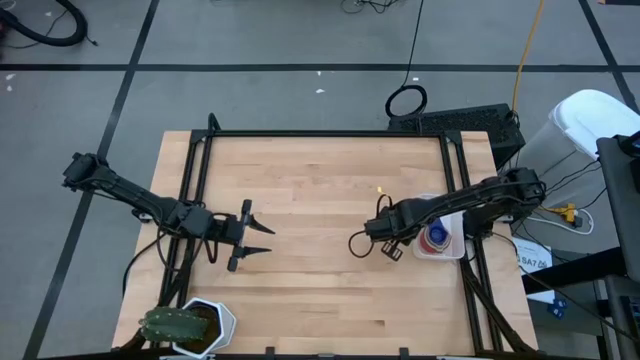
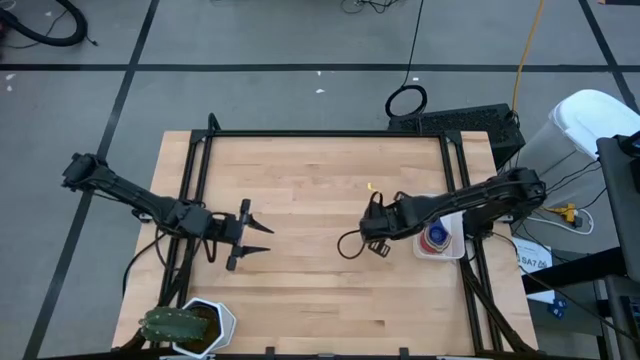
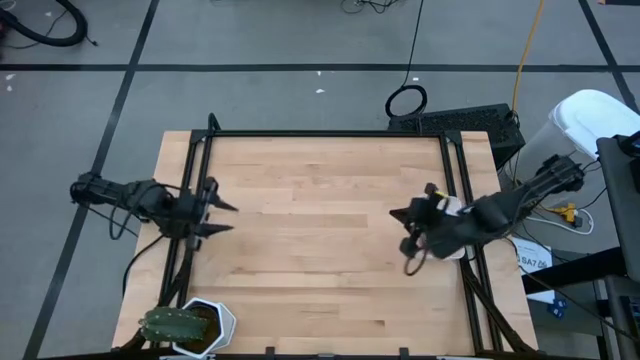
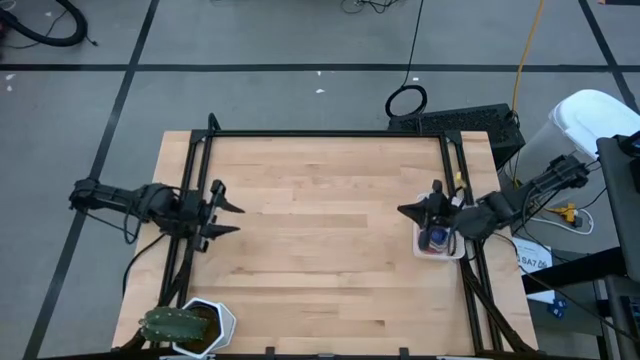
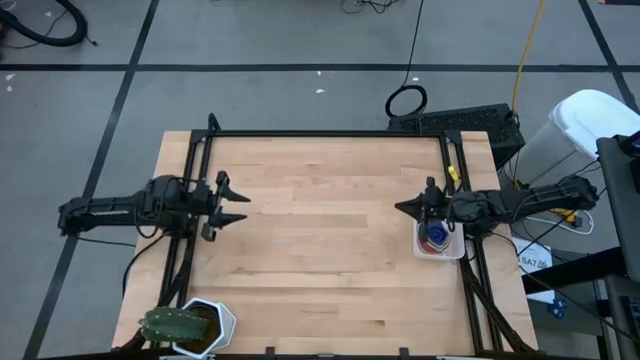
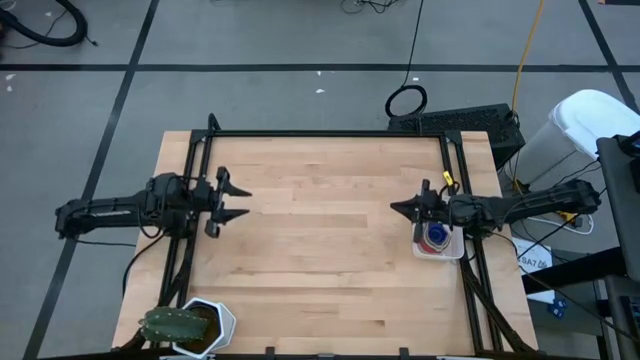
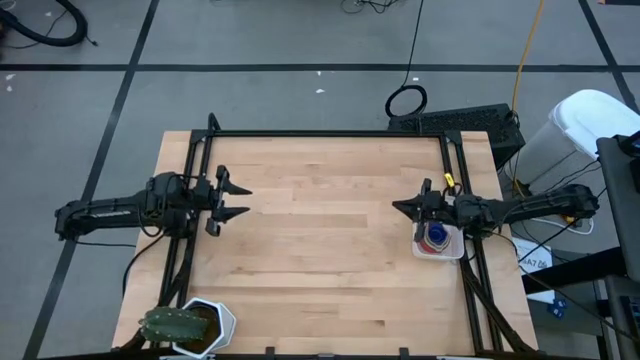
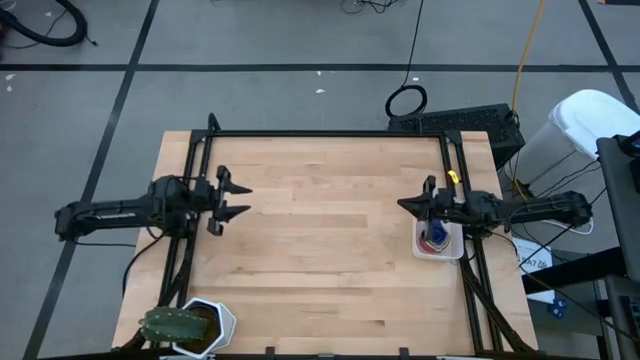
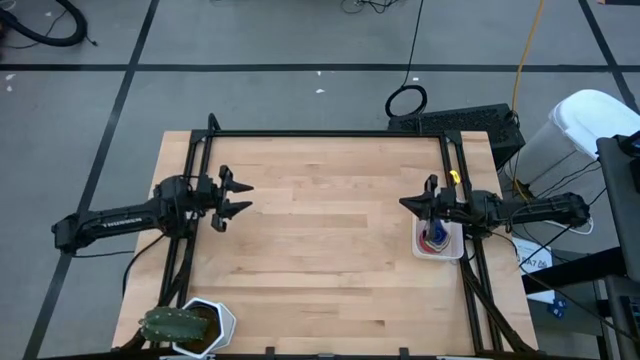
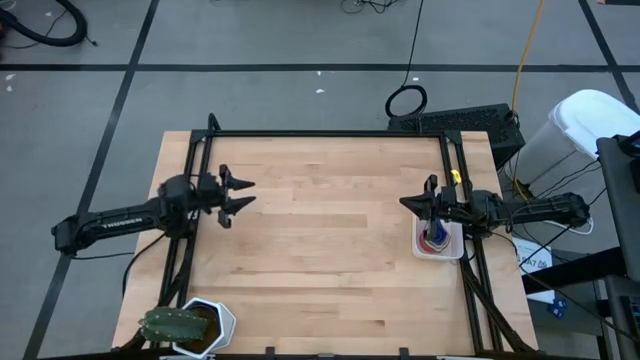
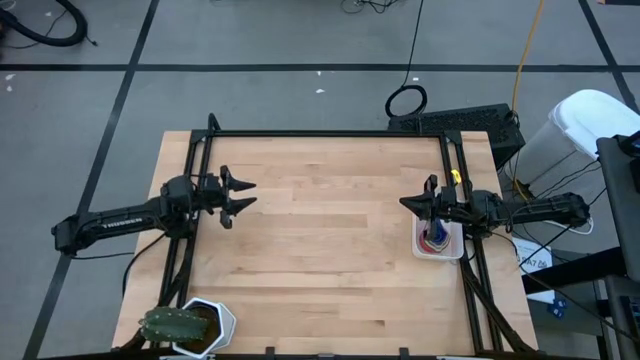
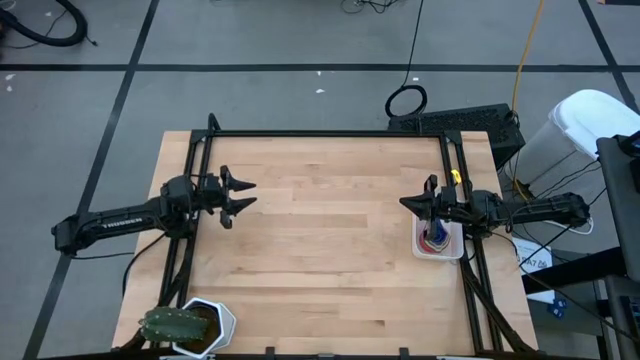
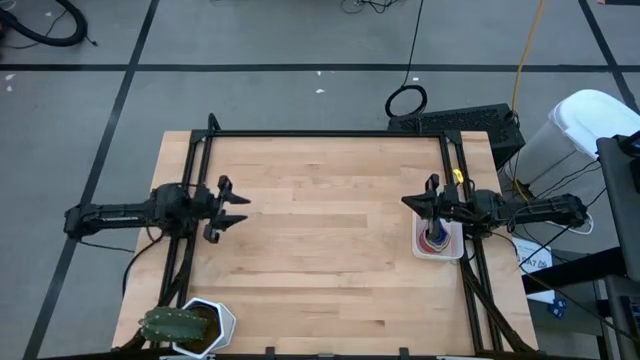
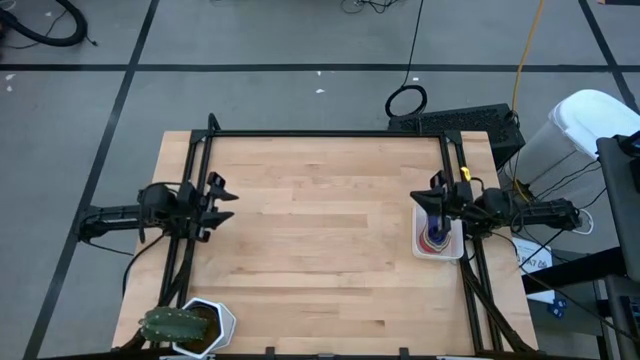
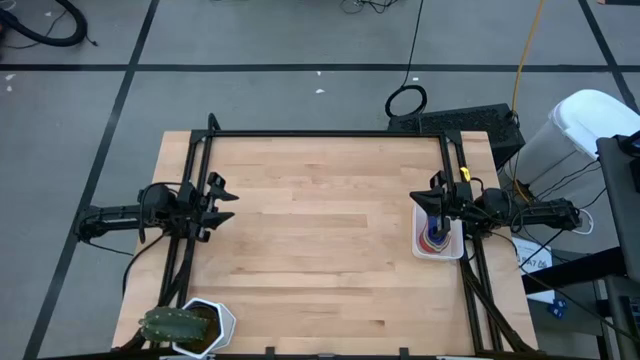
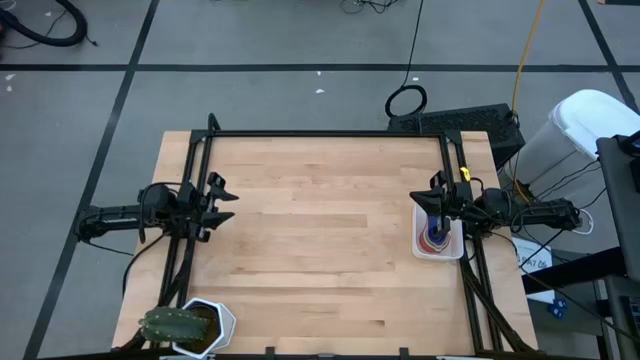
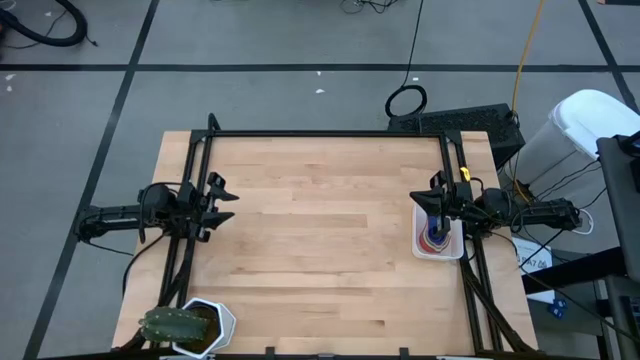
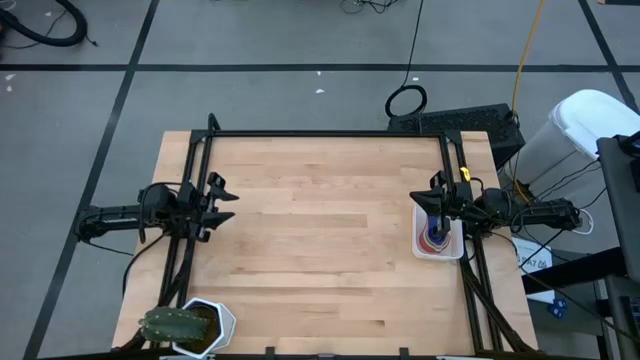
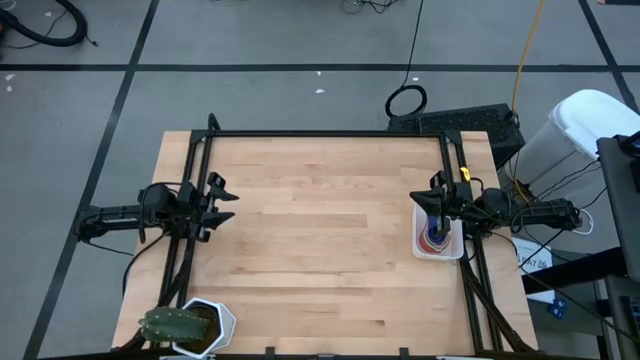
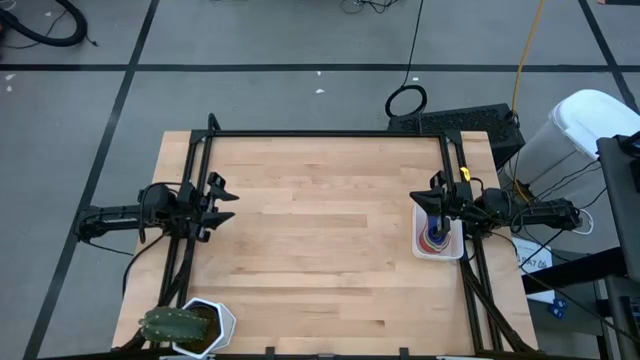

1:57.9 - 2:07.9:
Task: Nest measuring cups in basket
Return to Home Position

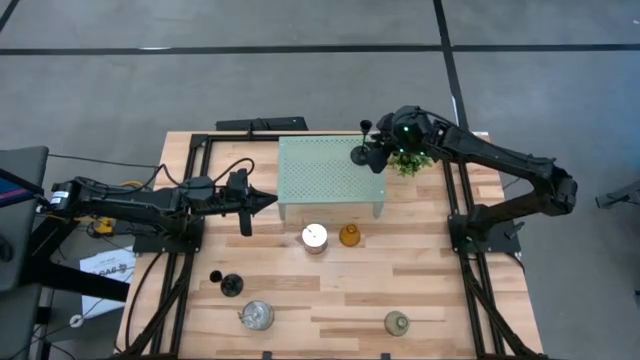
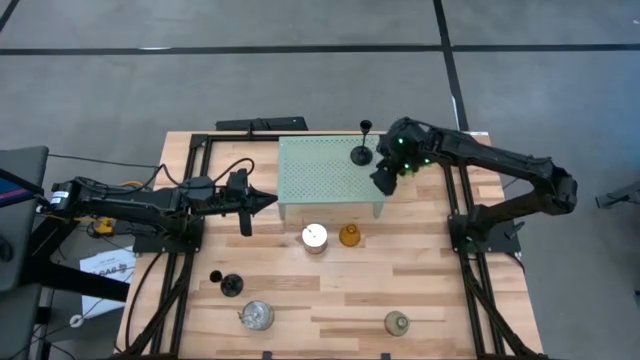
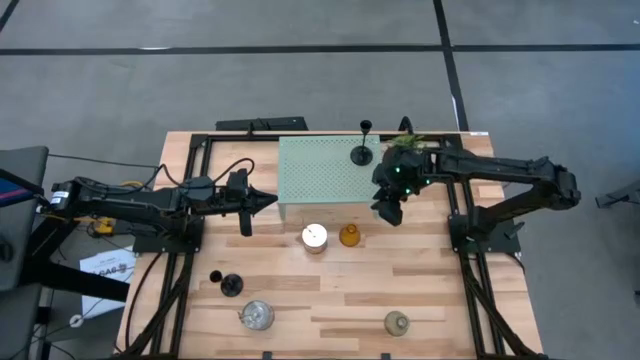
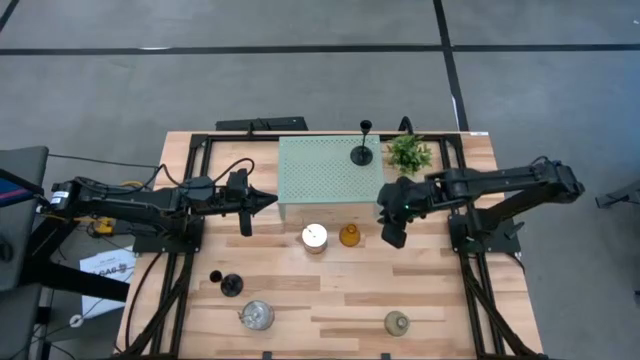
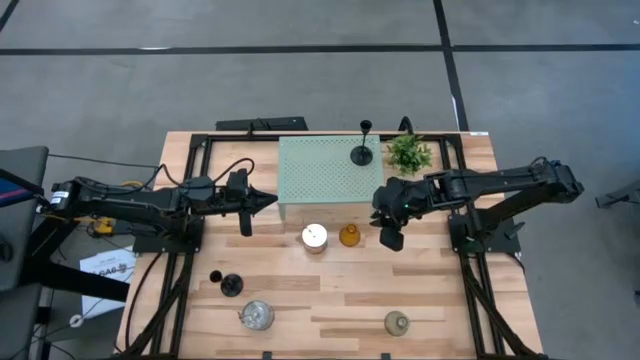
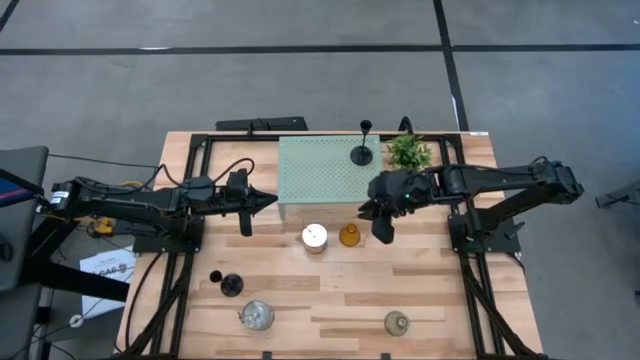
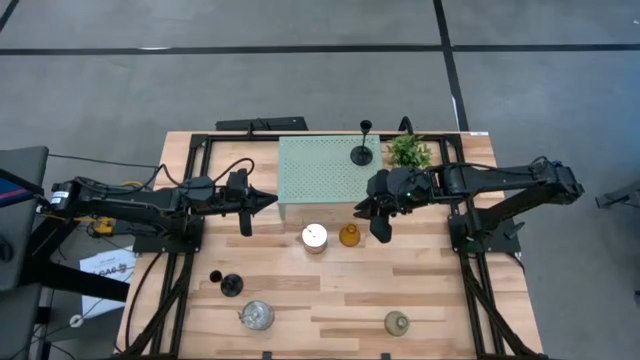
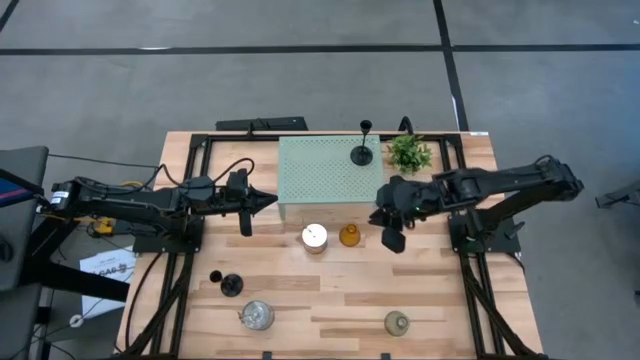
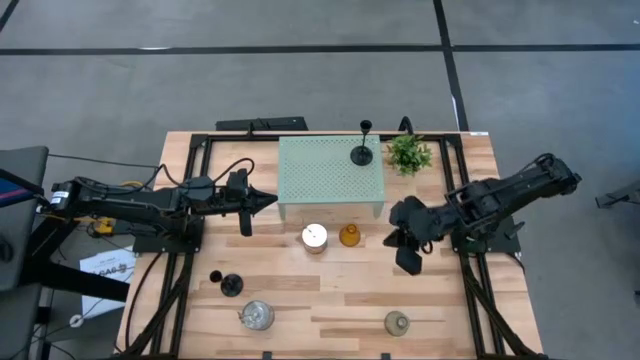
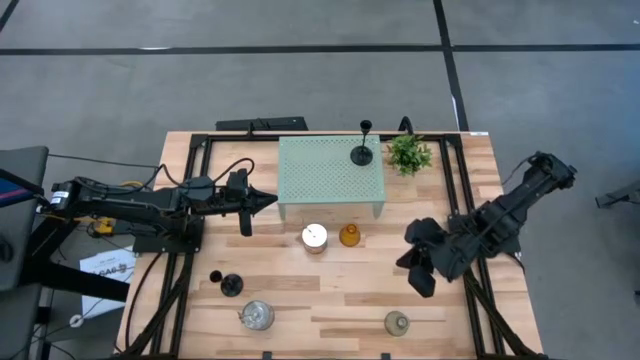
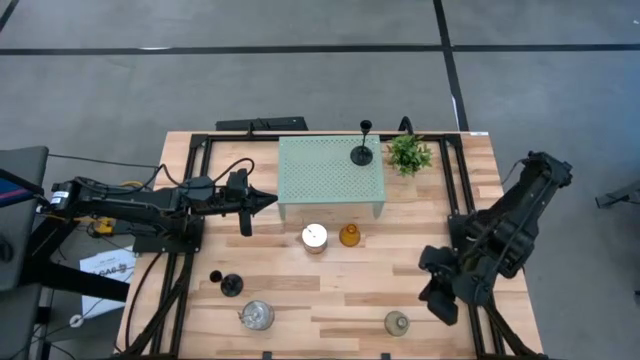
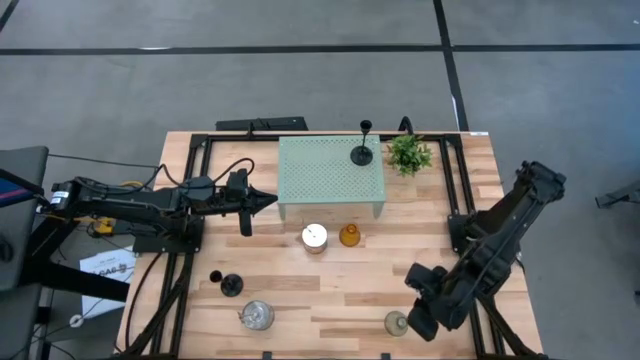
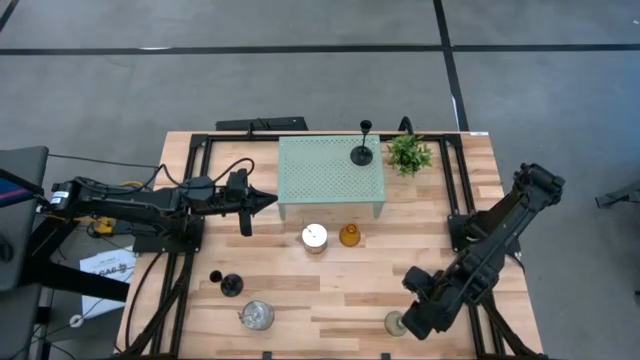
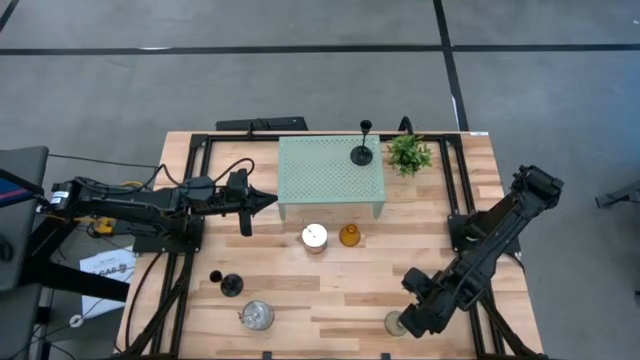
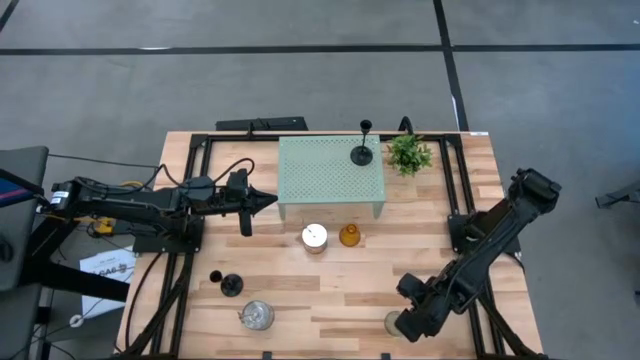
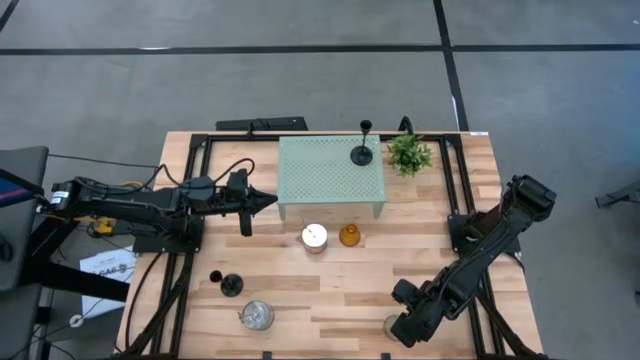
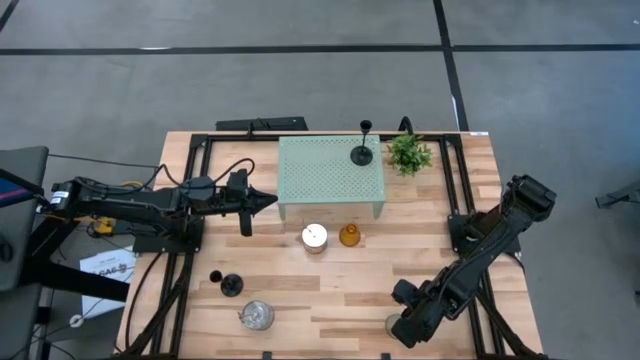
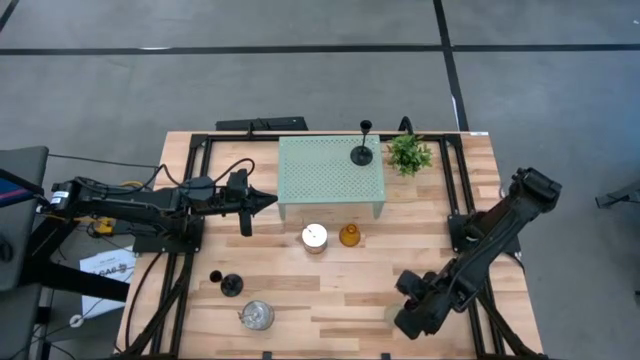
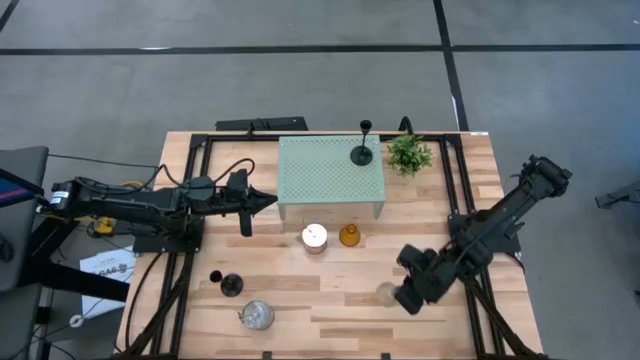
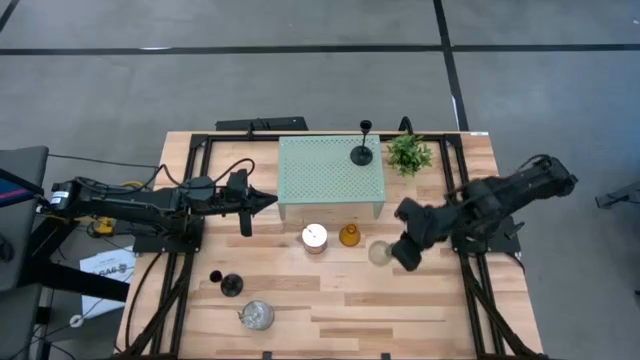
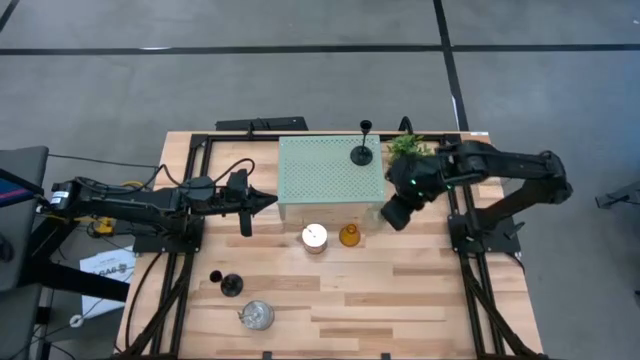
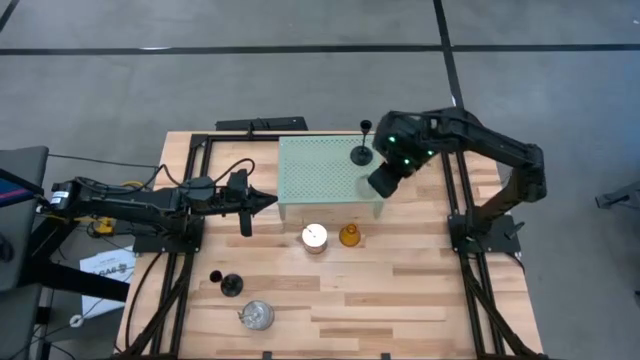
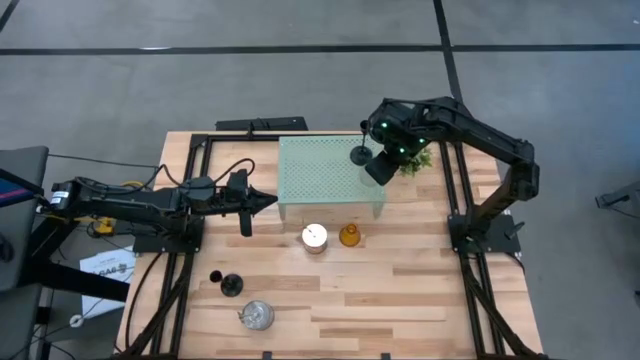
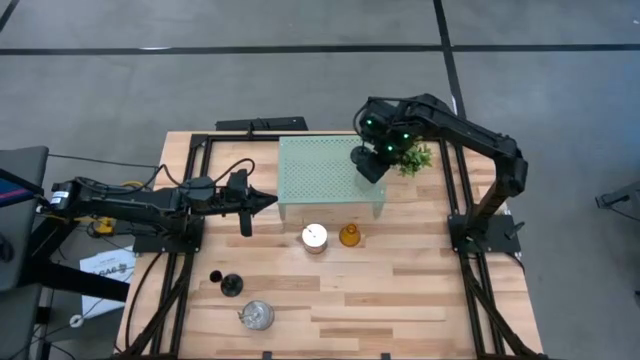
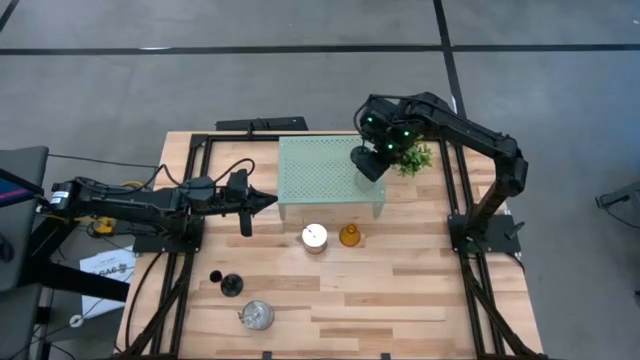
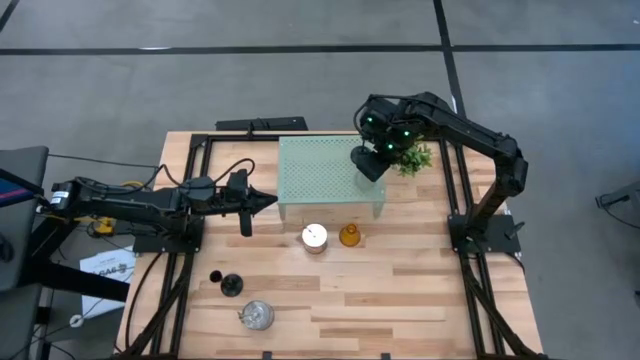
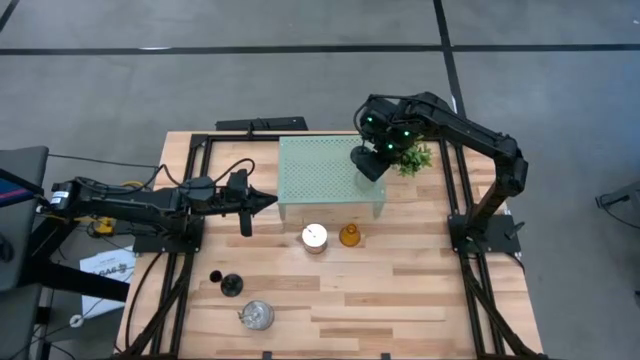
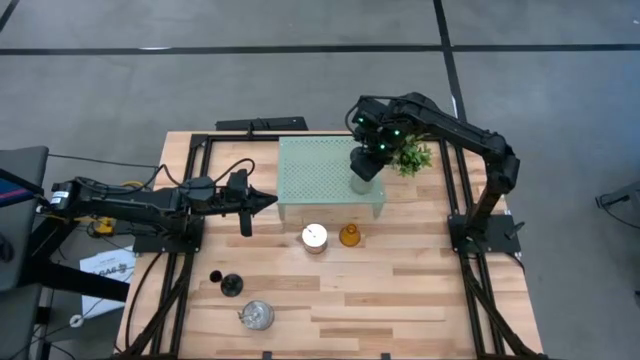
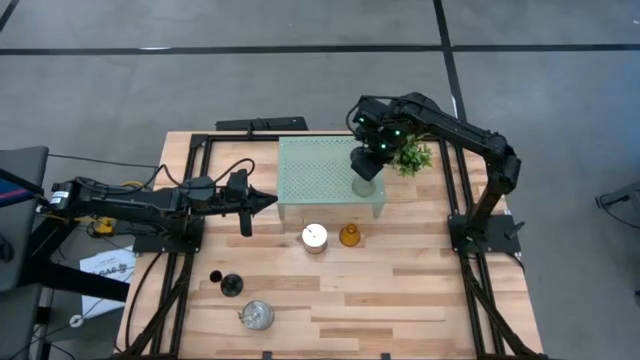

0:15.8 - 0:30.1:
Task: Pick & Place candle stick holders
Put the green glass candle holder on the shelf
